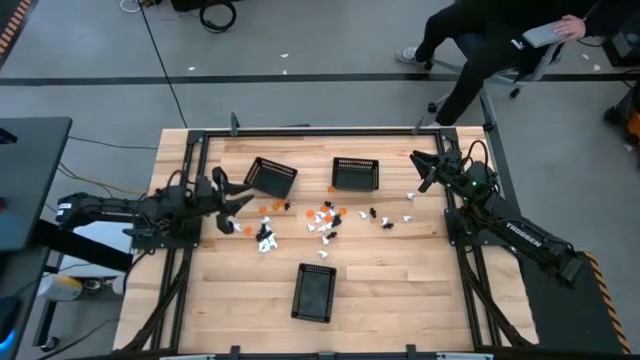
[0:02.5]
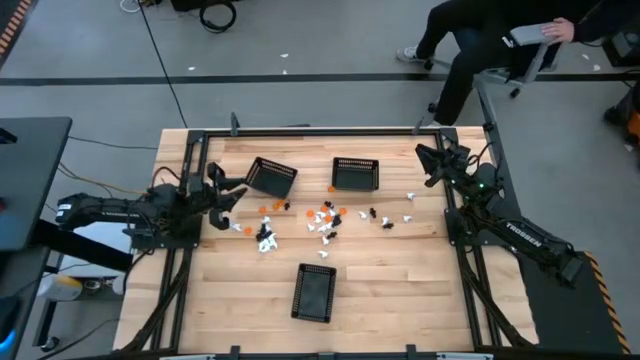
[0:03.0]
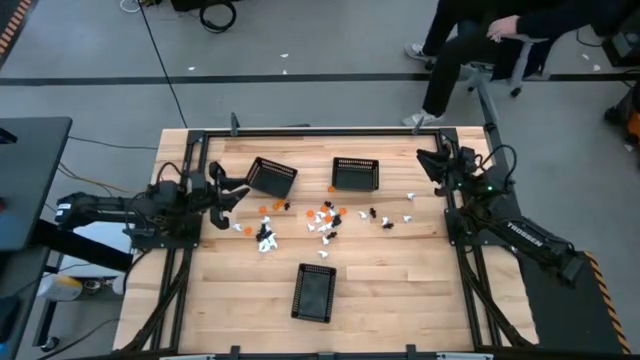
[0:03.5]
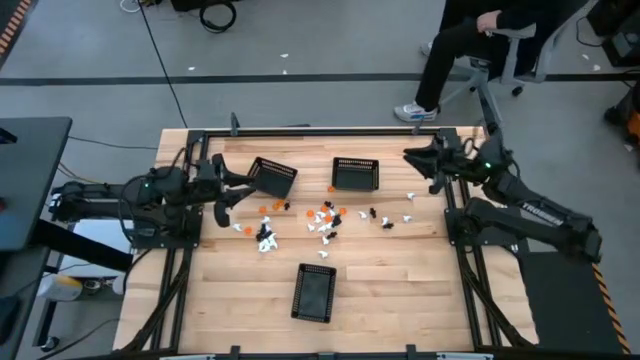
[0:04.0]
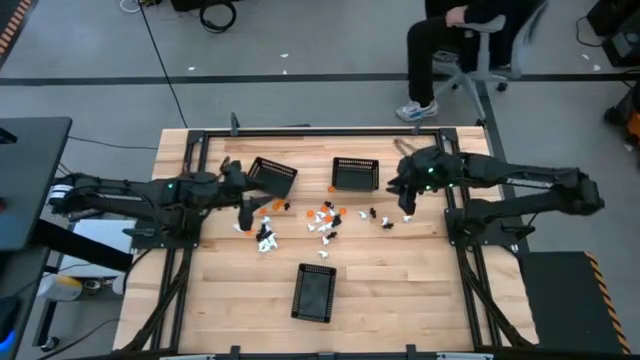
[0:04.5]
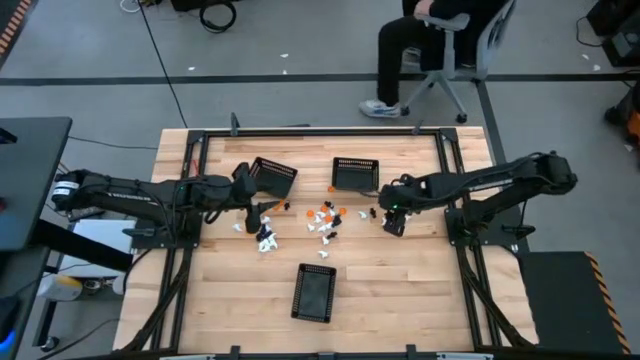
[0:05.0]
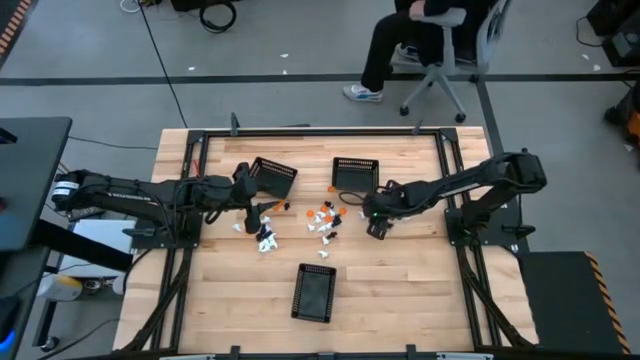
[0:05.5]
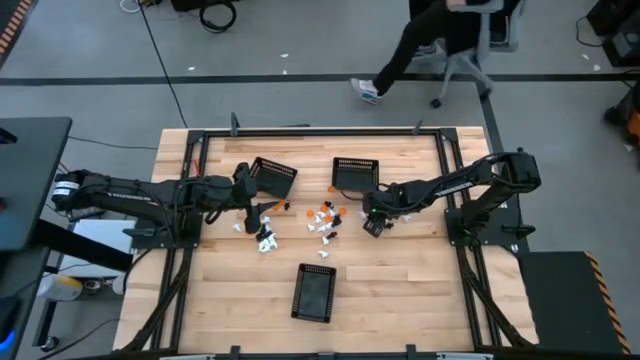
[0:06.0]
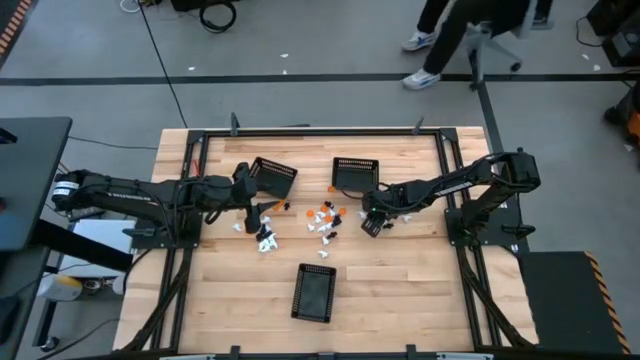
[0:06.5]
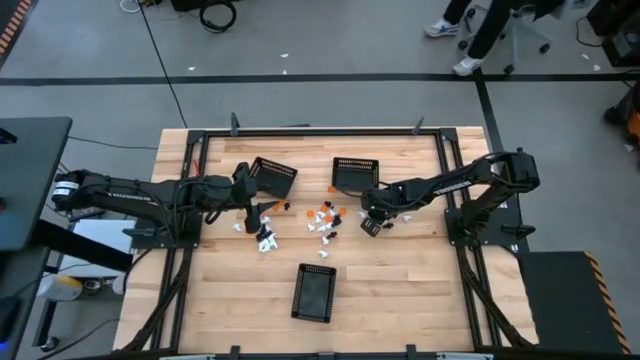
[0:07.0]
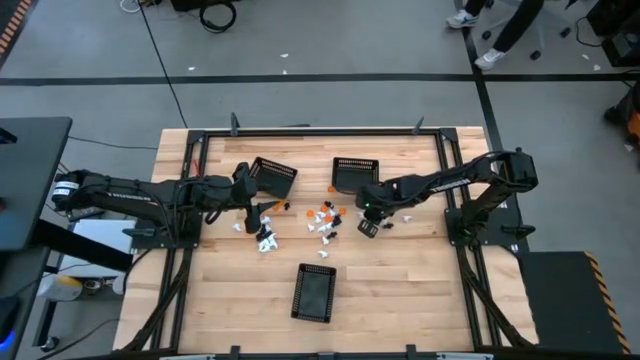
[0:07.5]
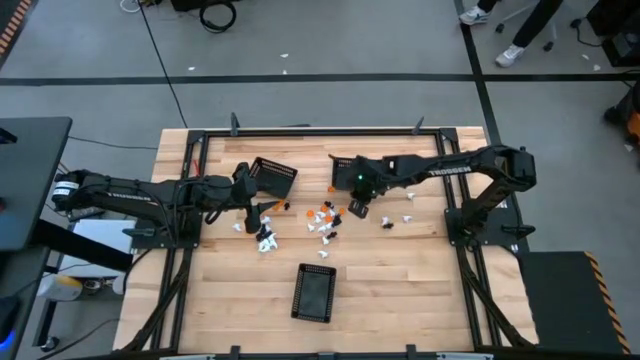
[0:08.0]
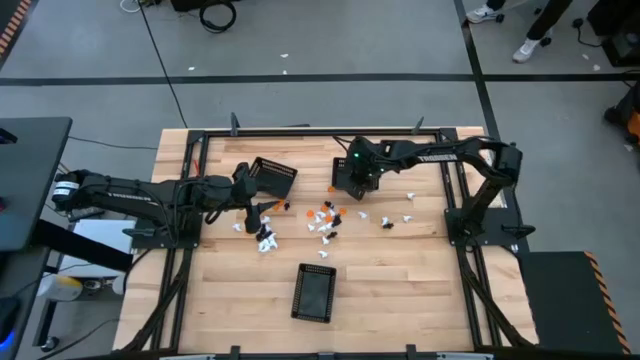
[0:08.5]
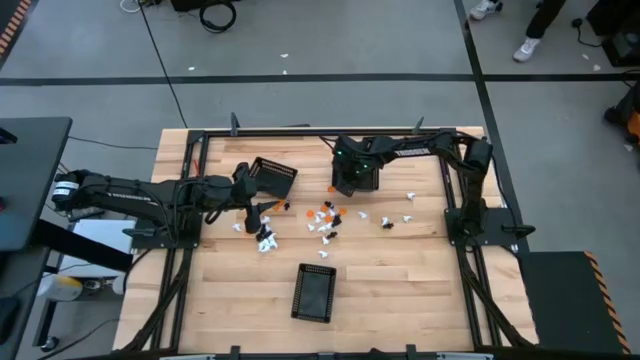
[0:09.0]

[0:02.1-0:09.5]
Task: Sort Halloween decoration
Put the black skeleton toy into the top right black basket

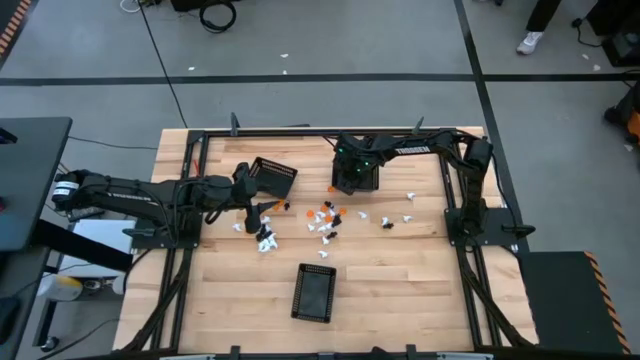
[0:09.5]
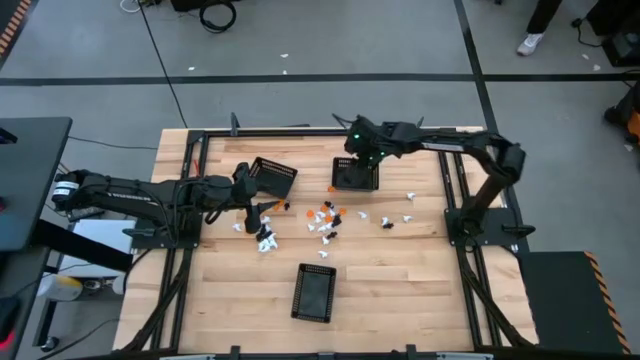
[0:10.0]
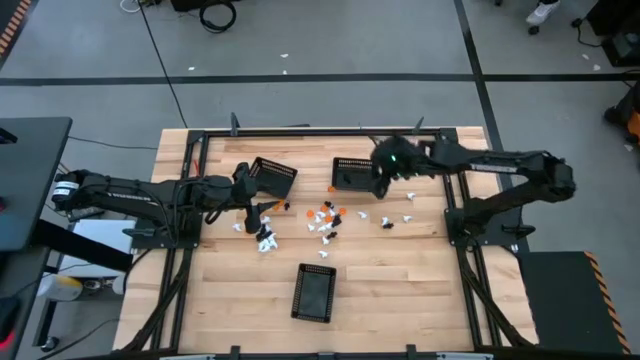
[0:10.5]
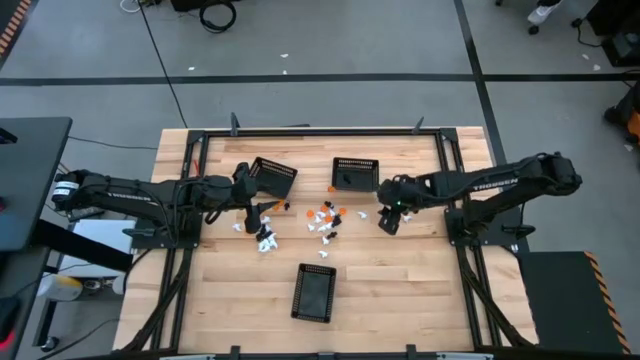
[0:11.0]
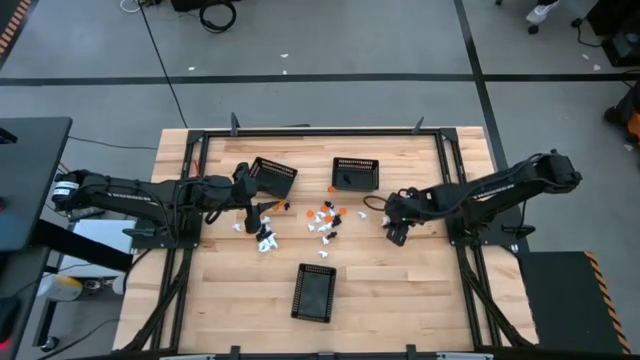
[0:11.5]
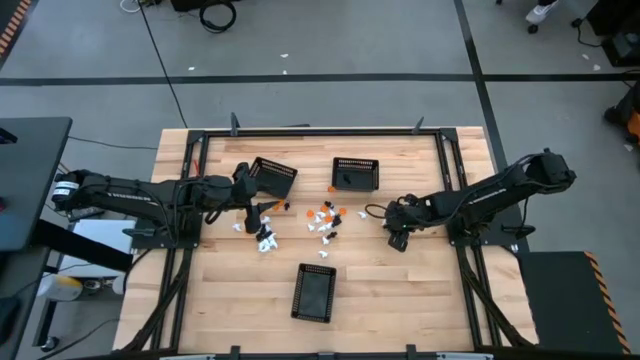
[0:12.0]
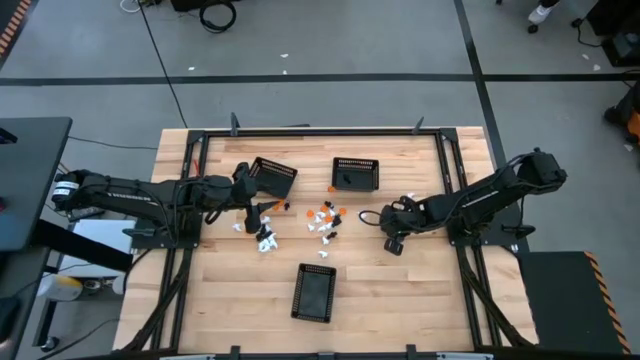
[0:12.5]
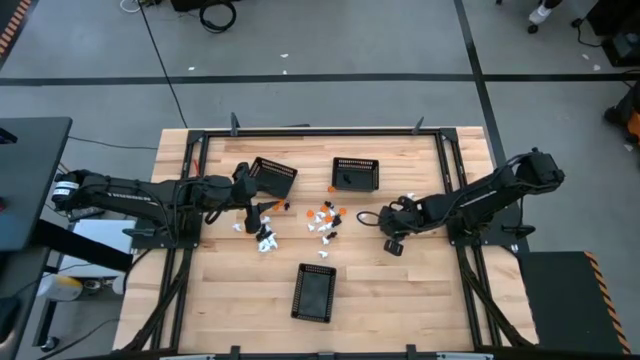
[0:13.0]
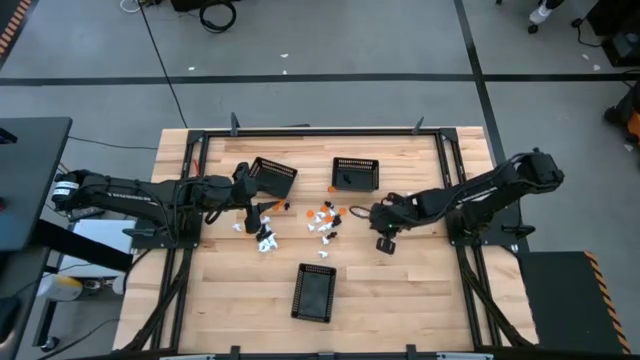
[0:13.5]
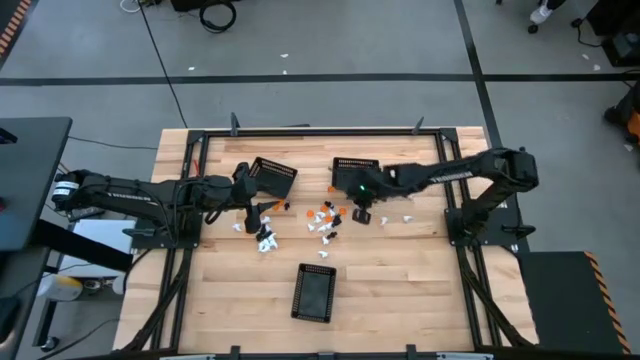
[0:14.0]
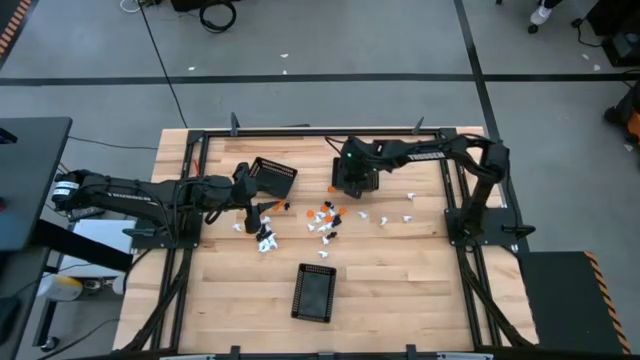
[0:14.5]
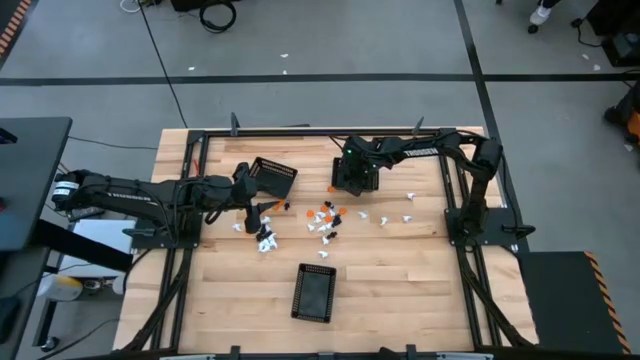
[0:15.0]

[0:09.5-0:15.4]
Put the black skeleton toy into the top right black basket

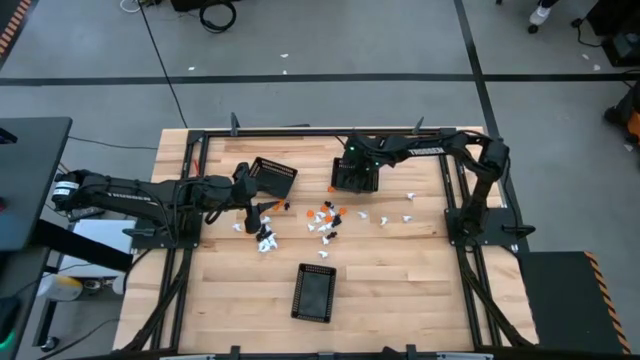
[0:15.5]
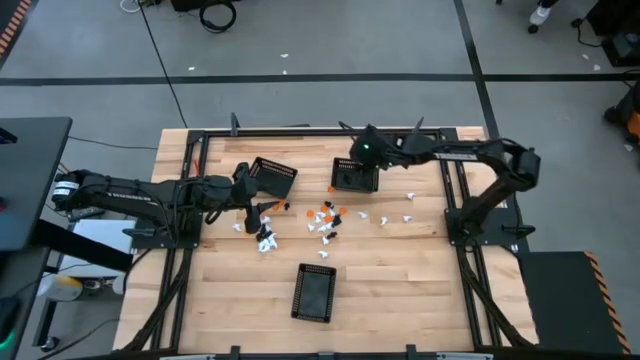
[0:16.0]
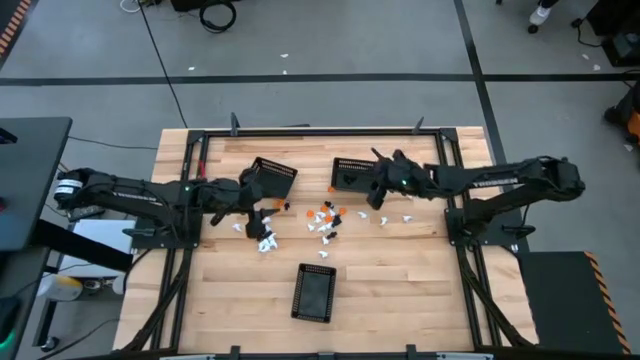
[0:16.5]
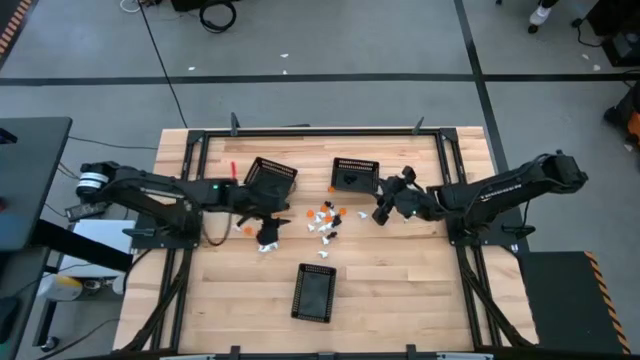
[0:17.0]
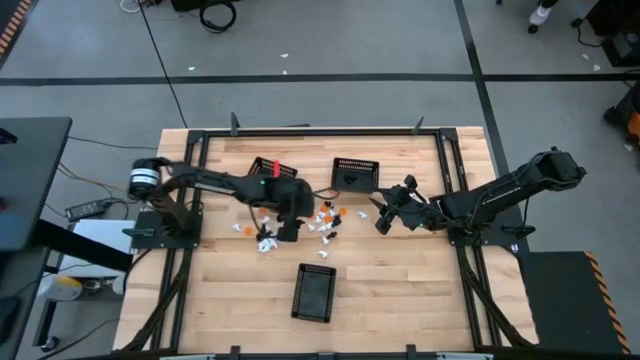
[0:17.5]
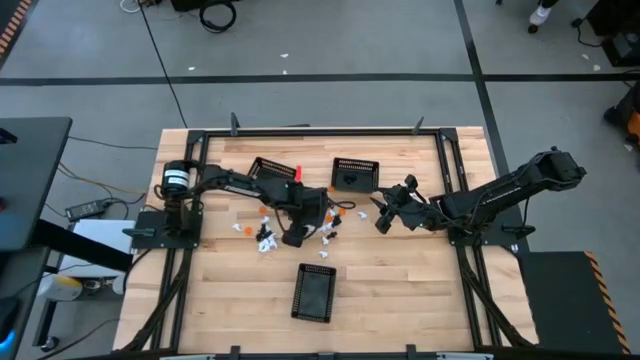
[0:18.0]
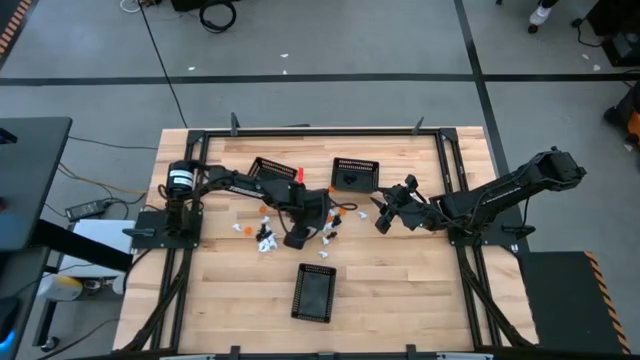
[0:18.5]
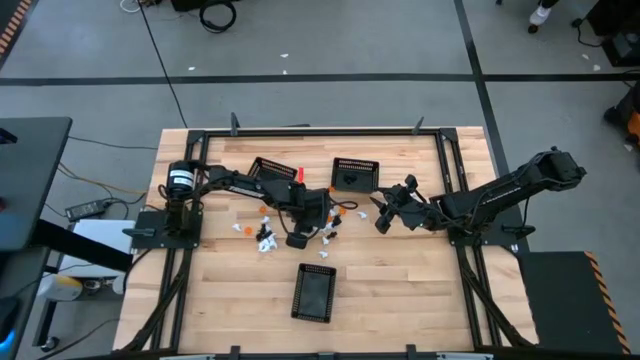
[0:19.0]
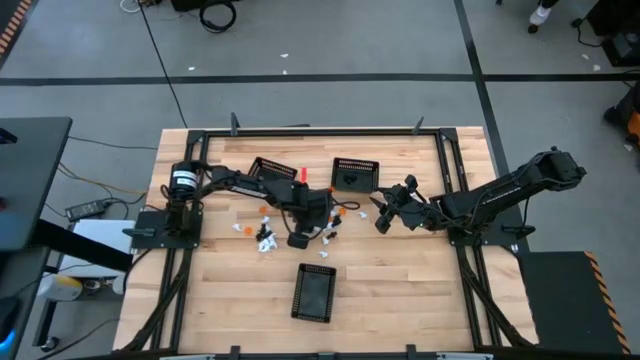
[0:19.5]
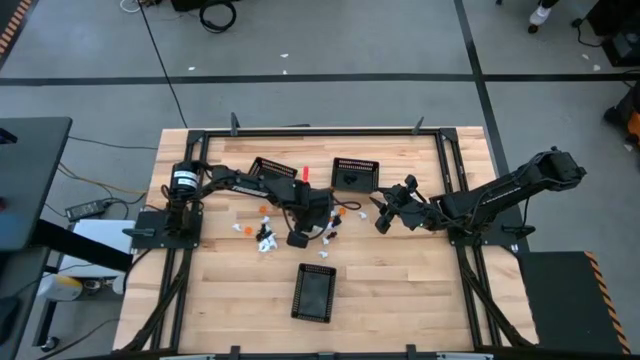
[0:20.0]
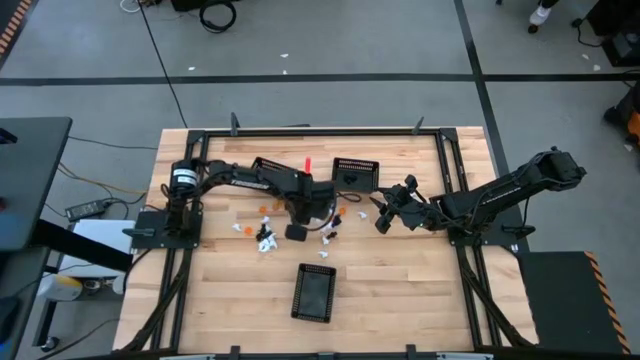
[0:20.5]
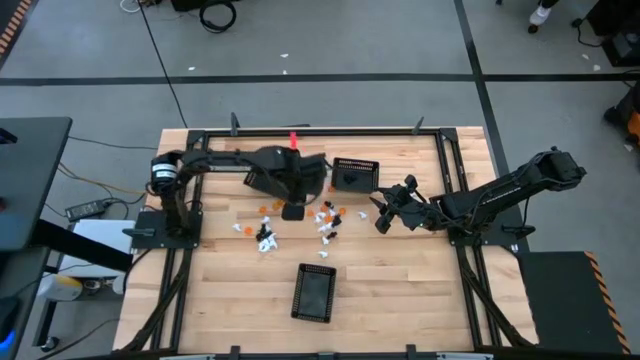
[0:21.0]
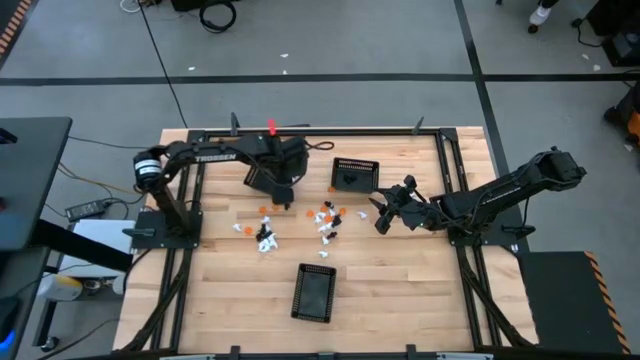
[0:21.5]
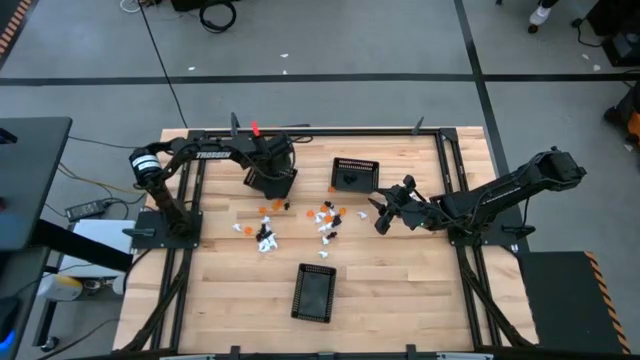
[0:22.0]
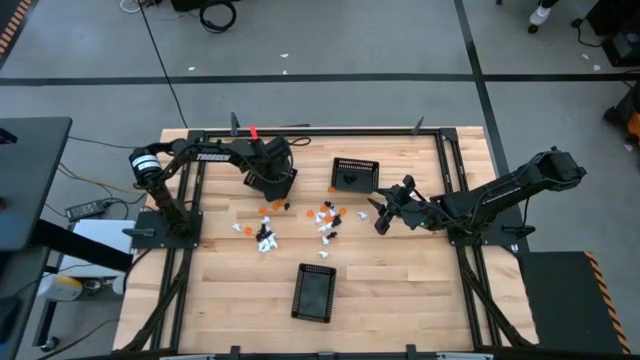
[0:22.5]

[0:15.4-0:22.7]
Put the white ghost toy into the top left black basket
